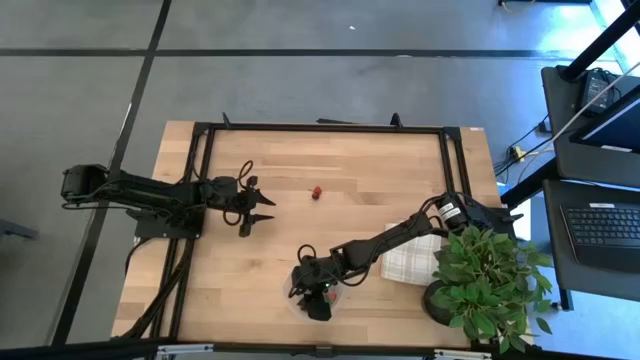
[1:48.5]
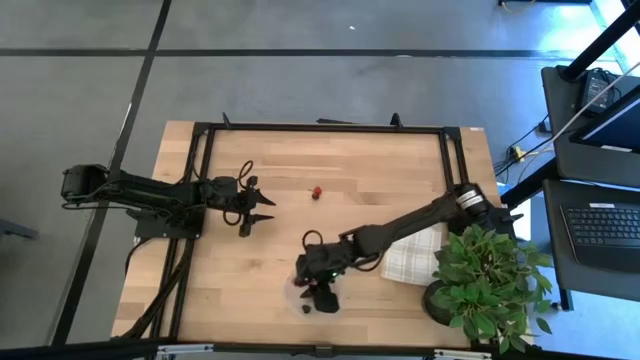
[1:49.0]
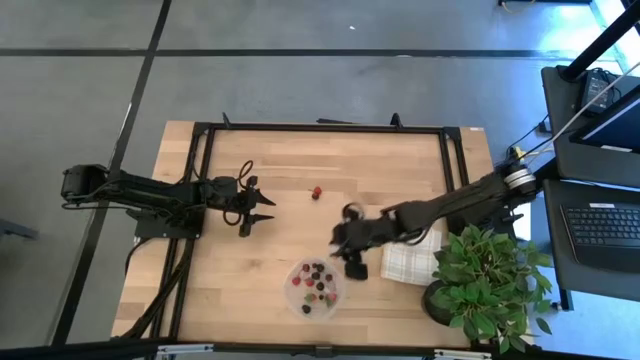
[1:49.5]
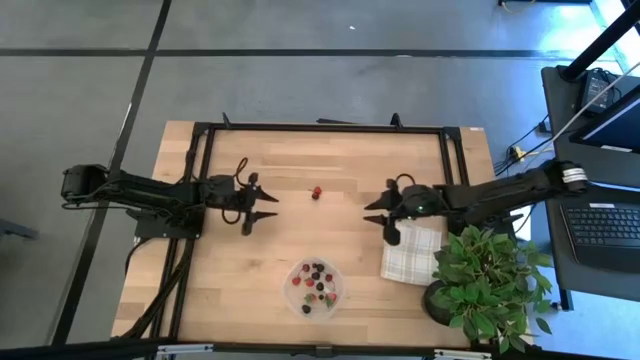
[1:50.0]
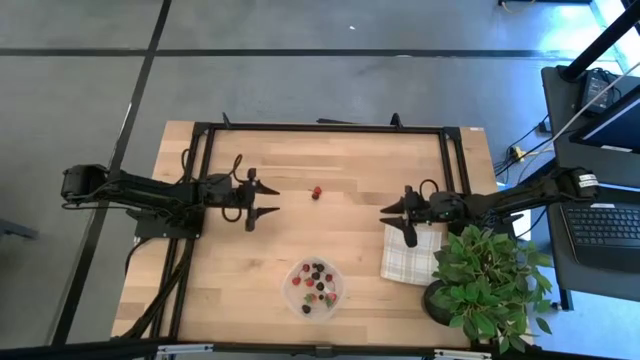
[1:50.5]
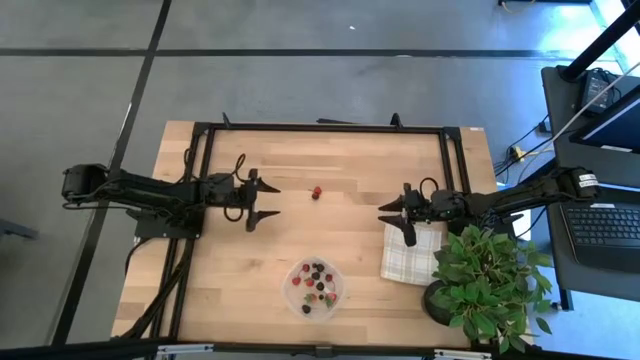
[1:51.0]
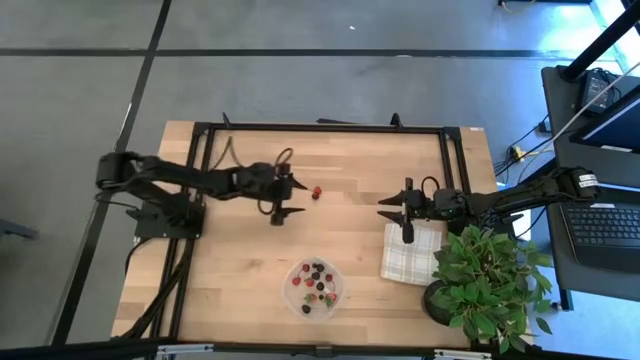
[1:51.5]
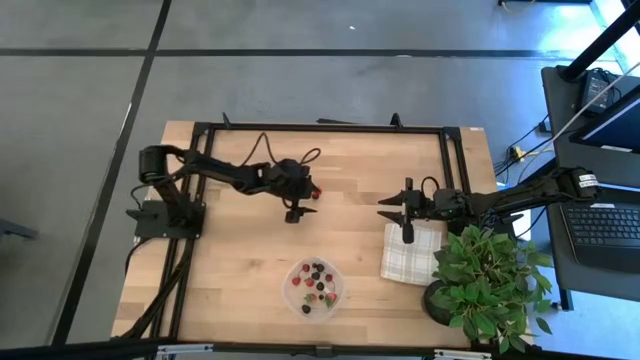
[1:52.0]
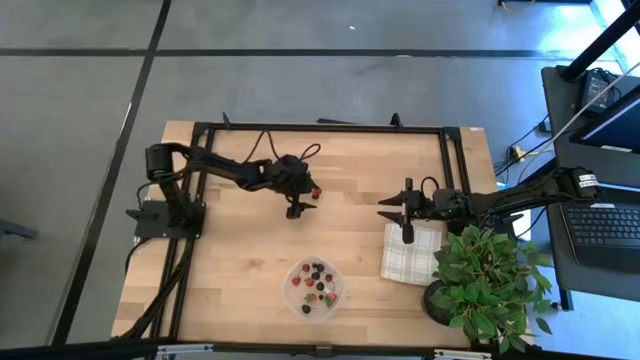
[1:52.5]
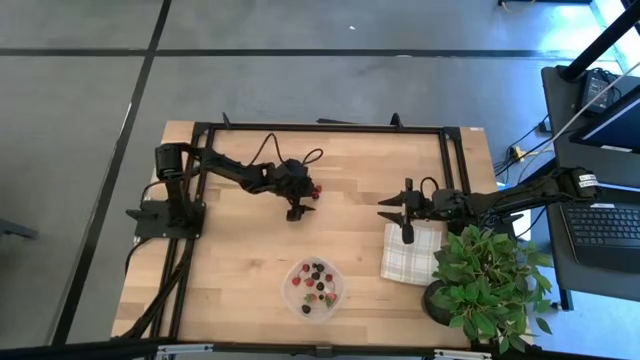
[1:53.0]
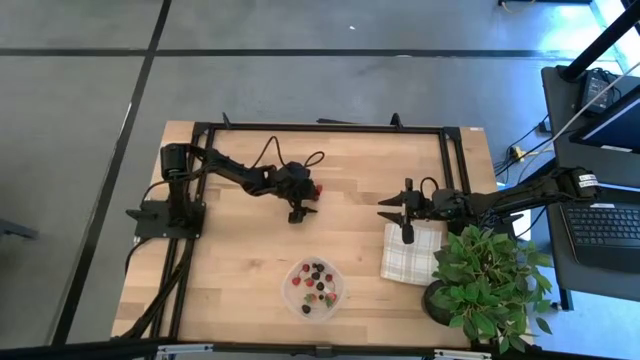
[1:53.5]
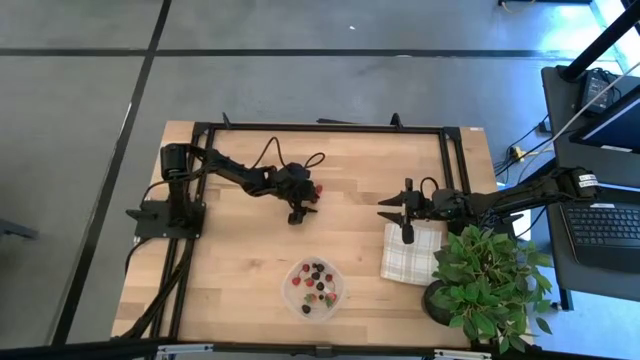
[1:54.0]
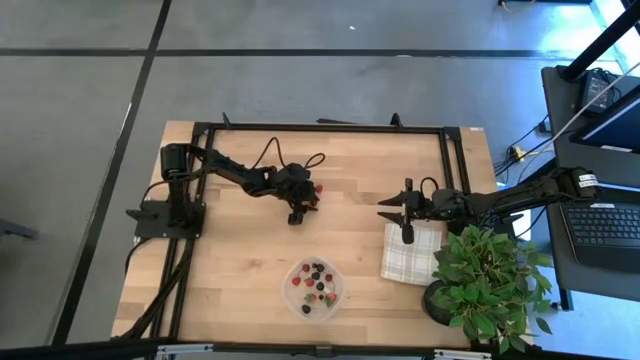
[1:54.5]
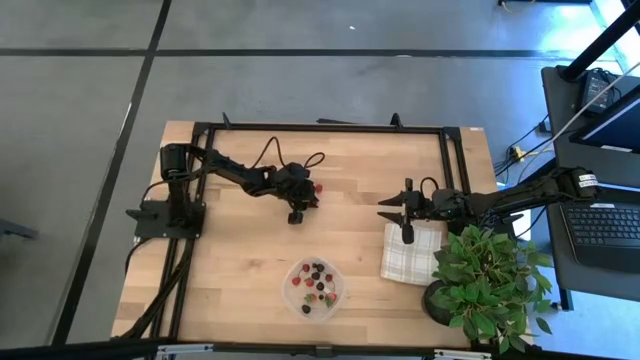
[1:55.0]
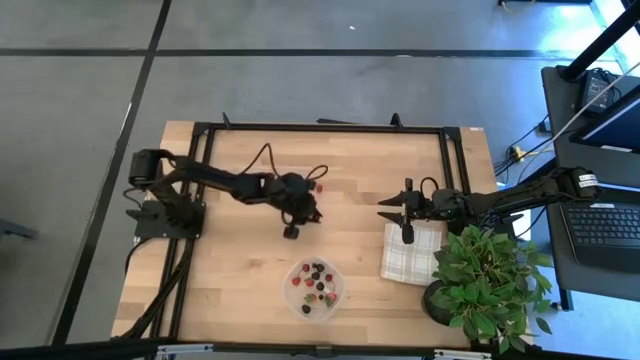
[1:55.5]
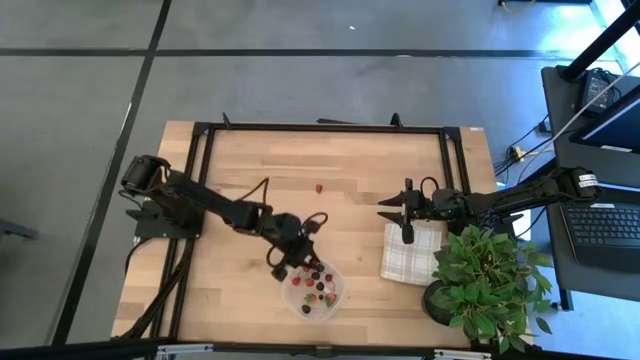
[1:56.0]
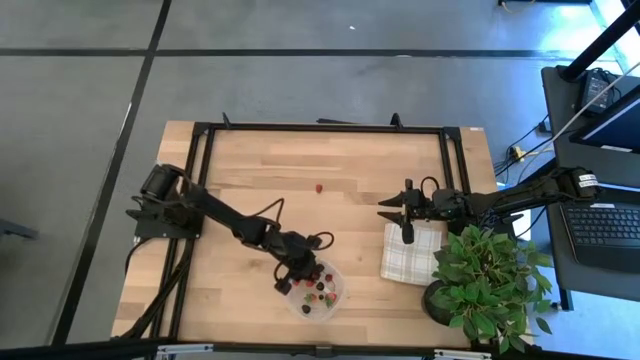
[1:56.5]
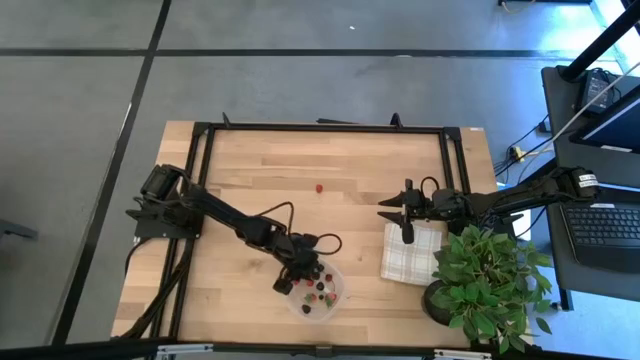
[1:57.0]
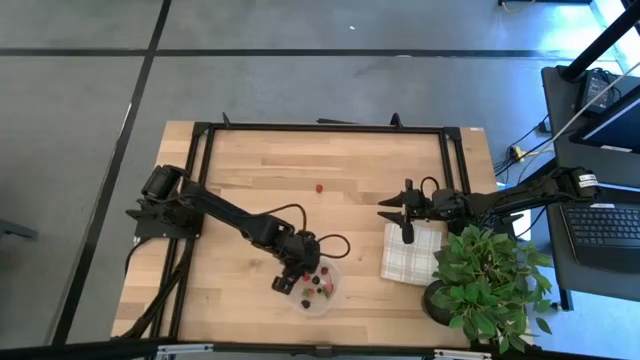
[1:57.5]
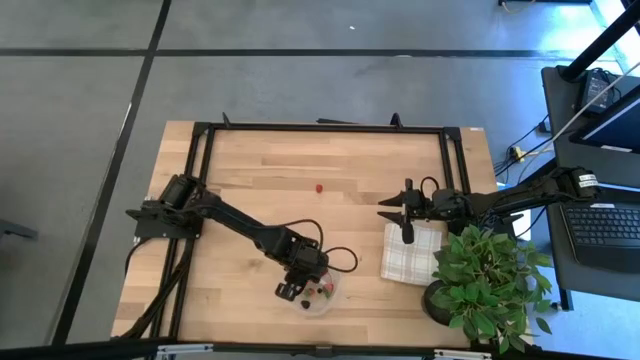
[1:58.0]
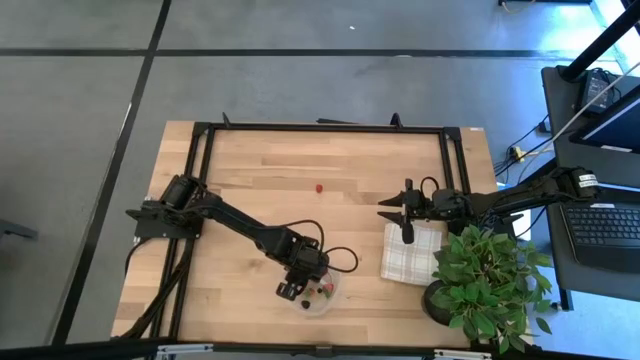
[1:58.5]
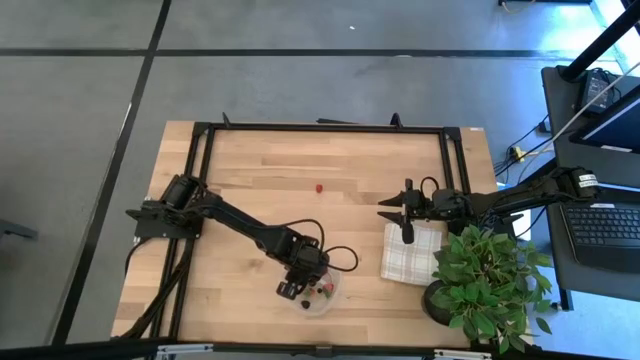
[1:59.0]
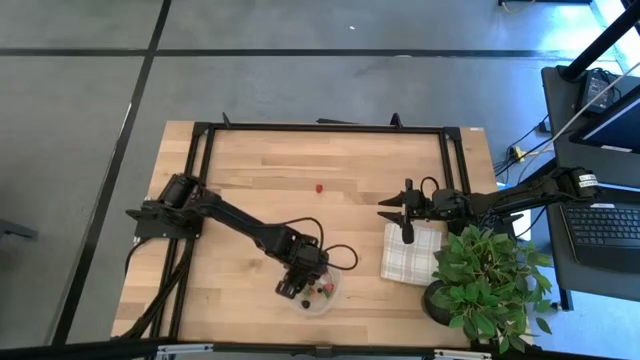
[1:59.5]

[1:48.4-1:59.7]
Task: Pick and placing Produce into tupperware
Put the dark red cherry in the bottom transparent bin

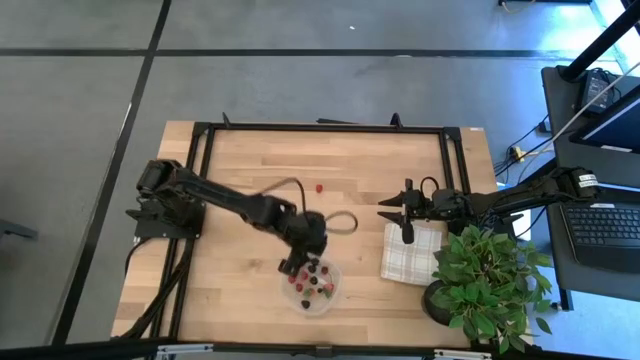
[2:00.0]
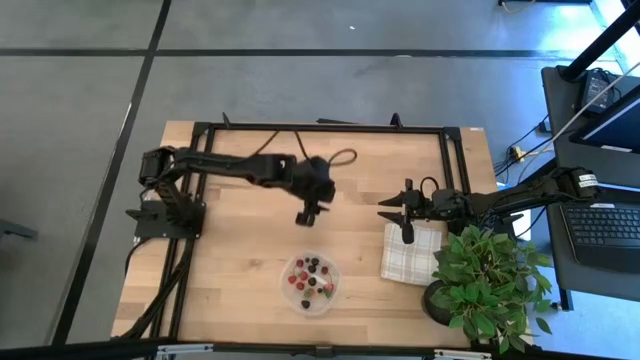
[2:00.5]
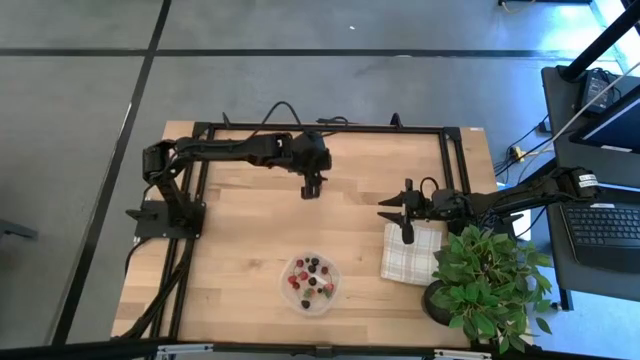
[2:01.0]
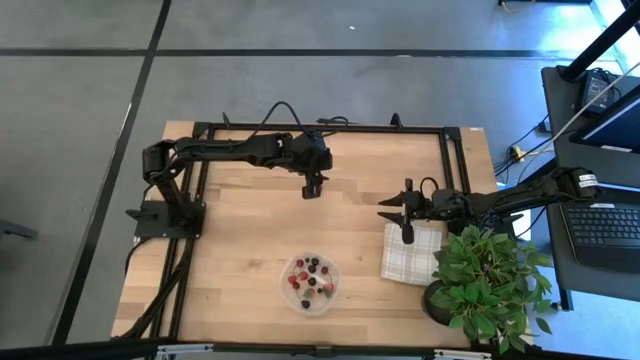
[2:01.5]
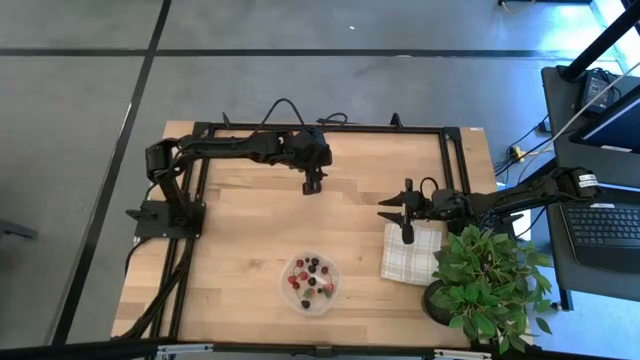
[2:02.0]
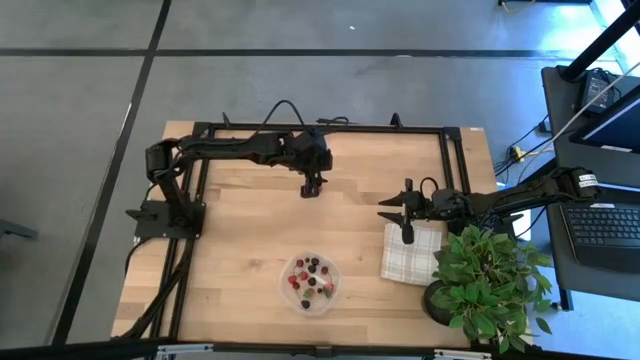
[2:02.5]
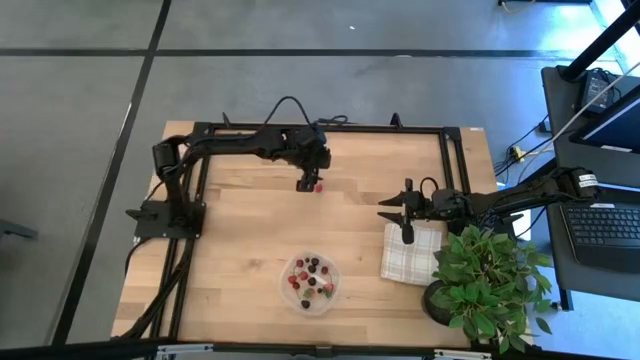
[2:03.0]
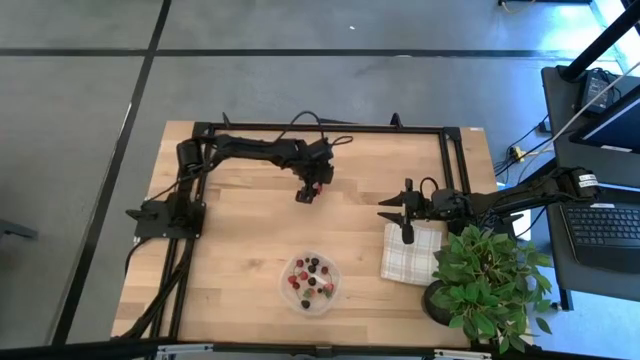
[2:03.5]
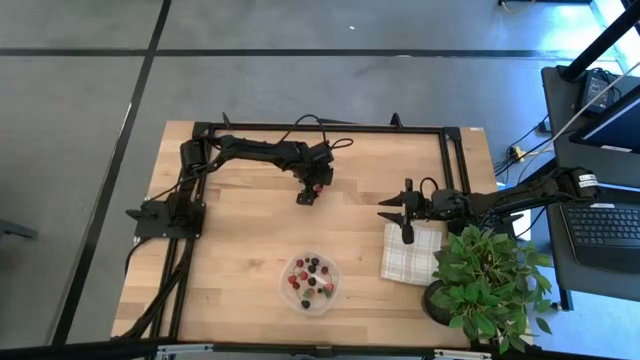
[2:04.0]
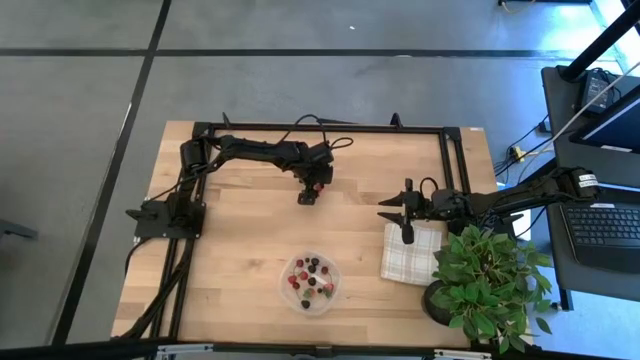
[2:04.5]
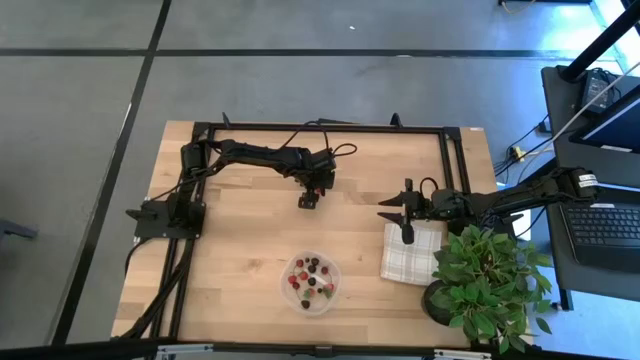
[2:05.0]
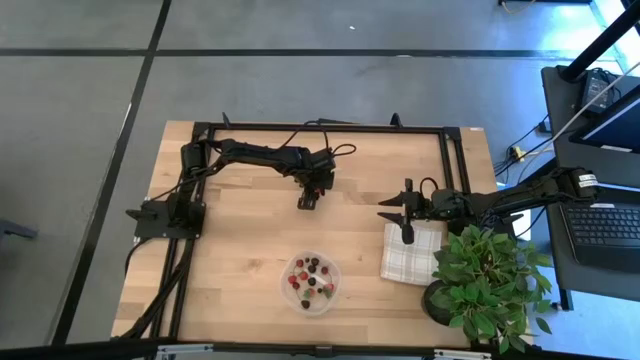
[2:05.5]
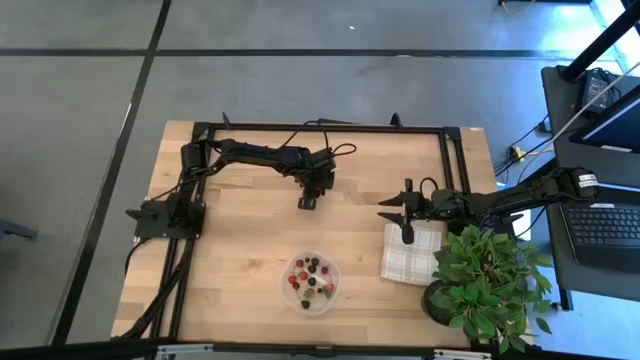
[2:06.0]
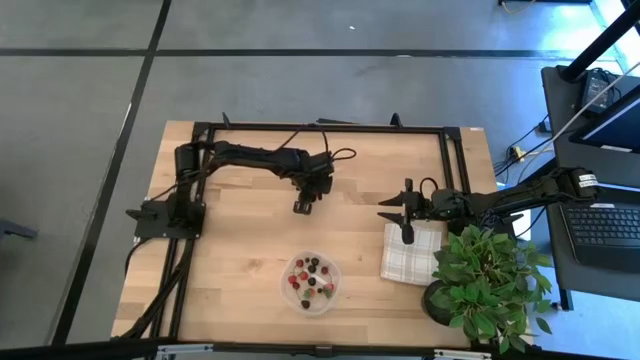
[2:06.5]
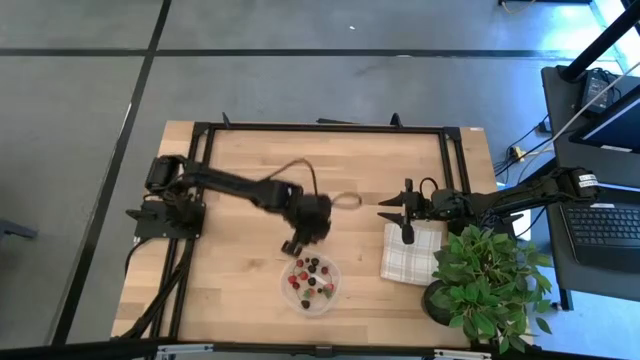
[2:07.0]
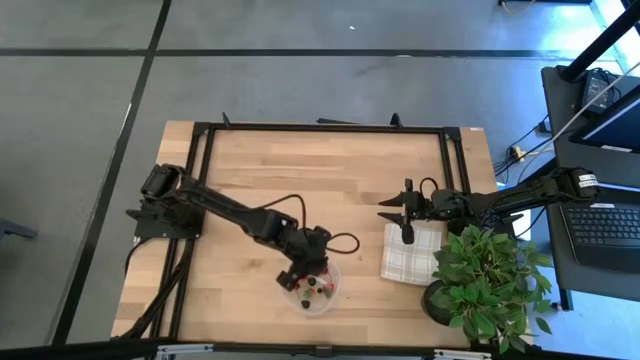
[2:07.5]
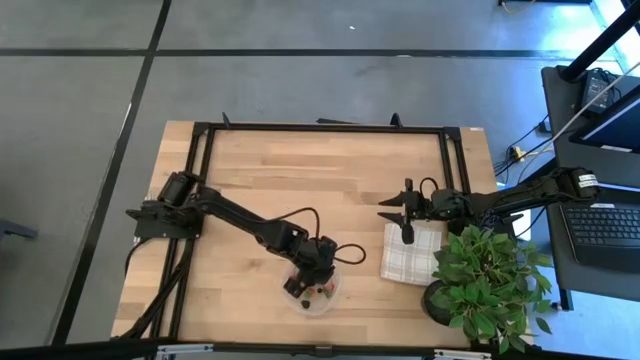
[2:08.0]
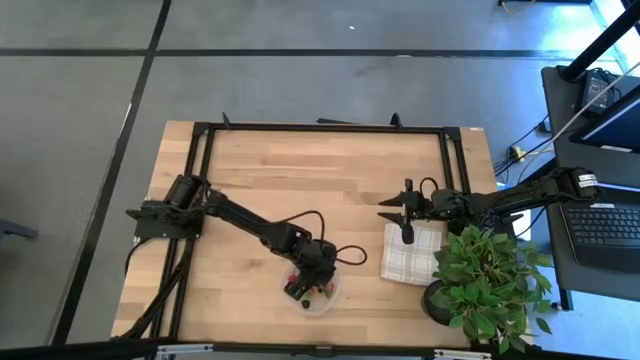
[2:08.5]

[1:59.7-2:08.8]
Put the raspberry in the bottom transparent bin
